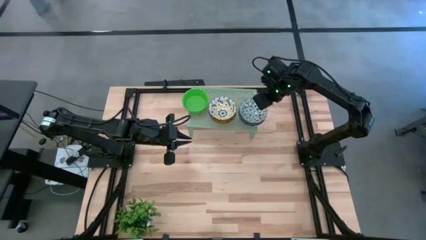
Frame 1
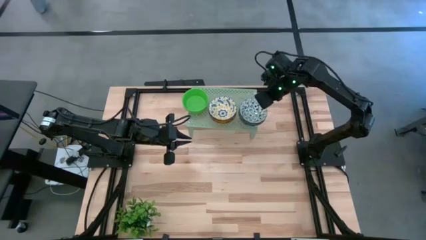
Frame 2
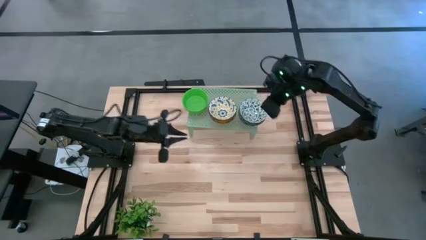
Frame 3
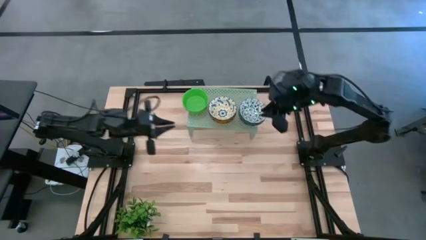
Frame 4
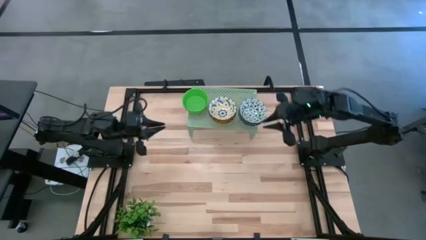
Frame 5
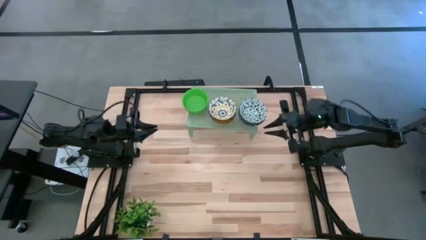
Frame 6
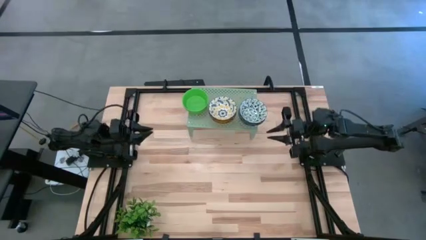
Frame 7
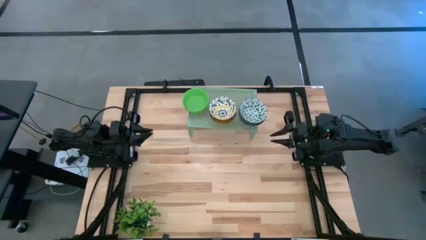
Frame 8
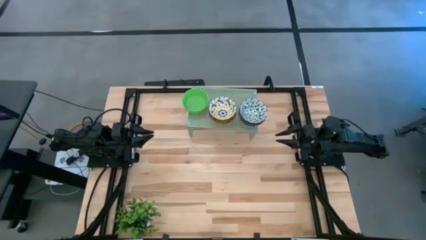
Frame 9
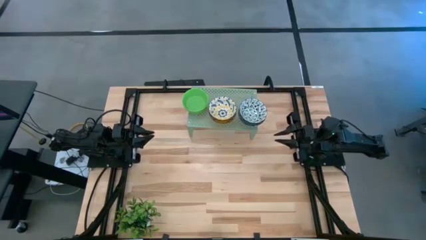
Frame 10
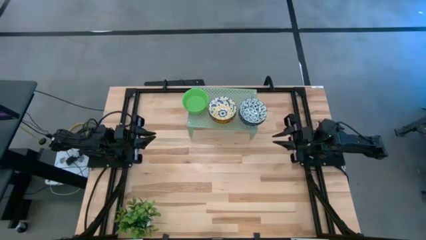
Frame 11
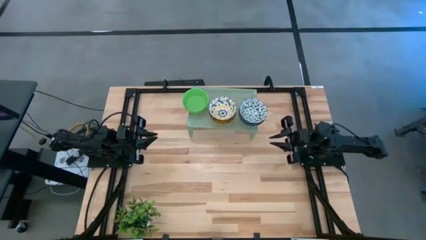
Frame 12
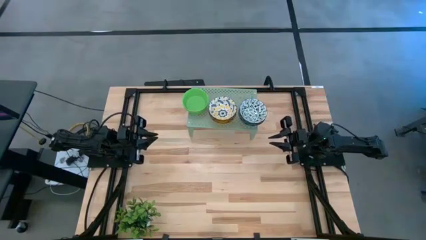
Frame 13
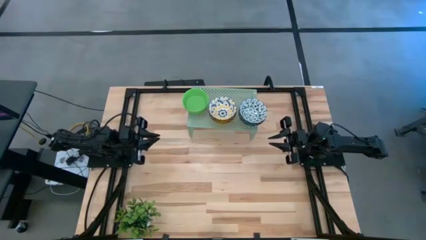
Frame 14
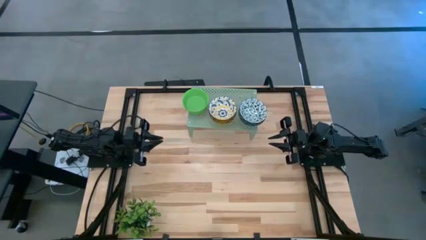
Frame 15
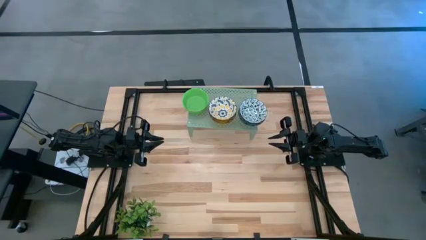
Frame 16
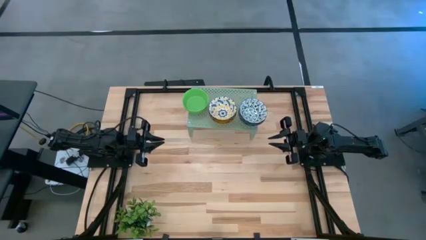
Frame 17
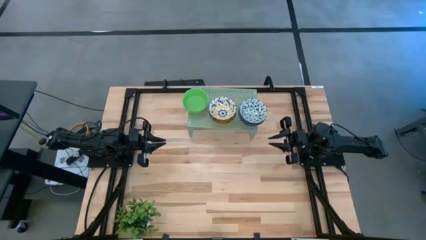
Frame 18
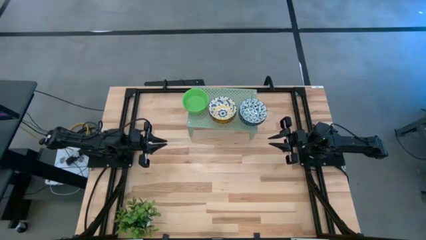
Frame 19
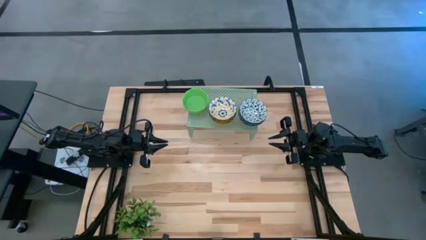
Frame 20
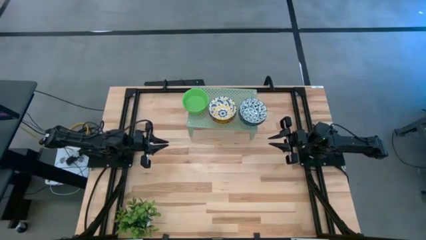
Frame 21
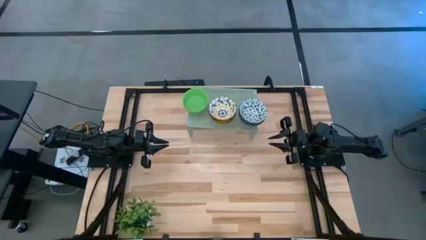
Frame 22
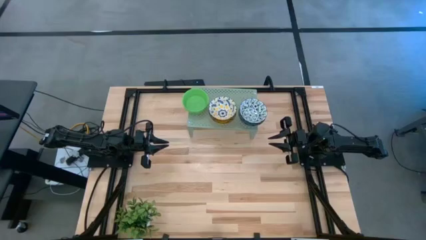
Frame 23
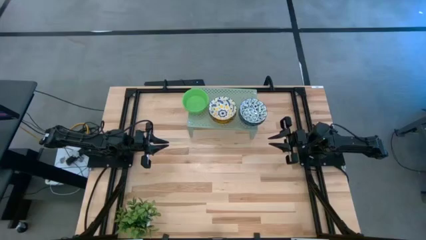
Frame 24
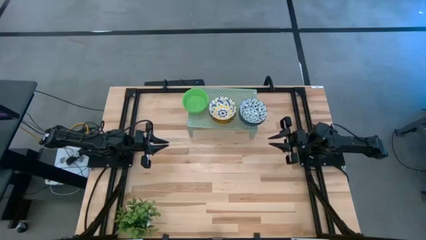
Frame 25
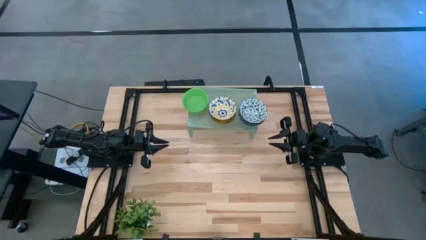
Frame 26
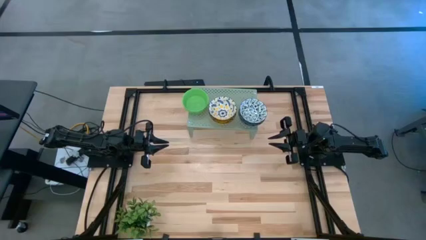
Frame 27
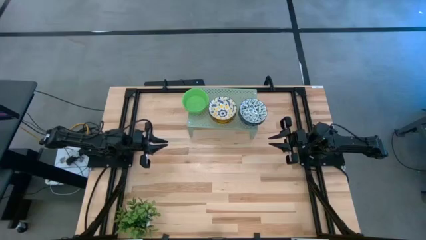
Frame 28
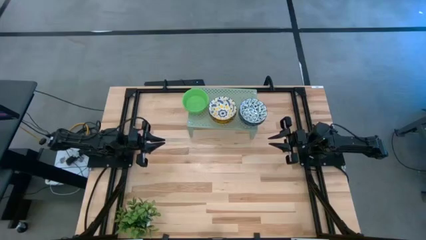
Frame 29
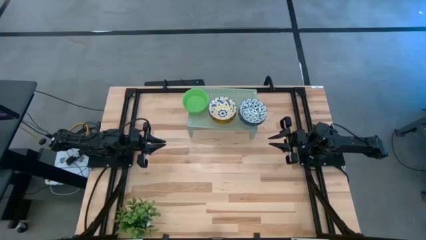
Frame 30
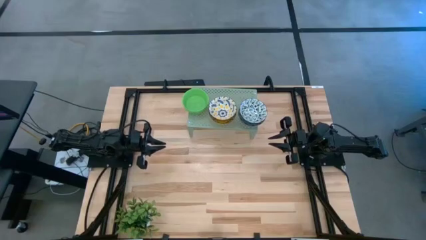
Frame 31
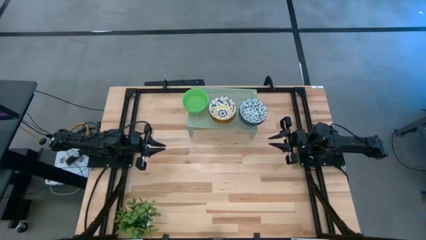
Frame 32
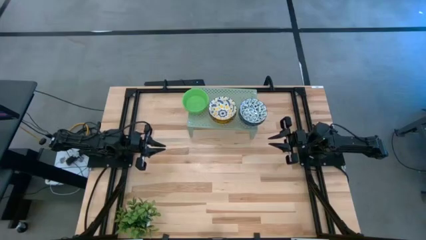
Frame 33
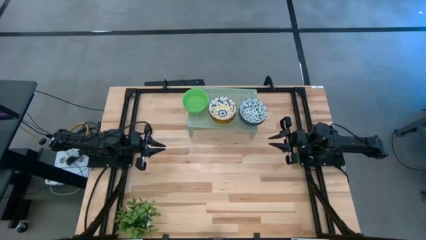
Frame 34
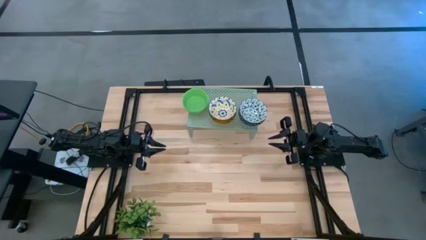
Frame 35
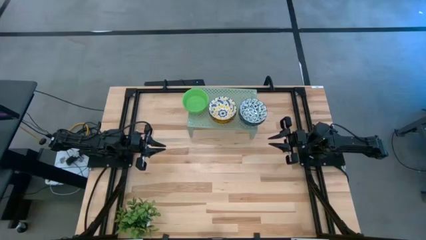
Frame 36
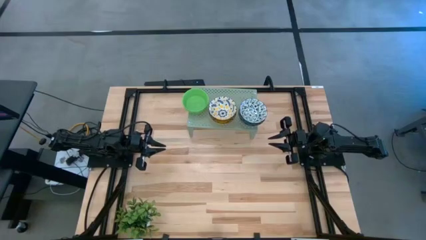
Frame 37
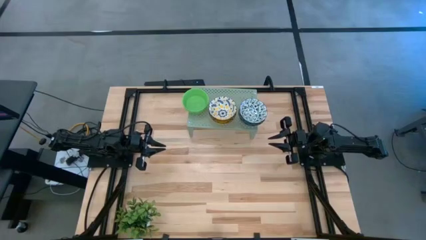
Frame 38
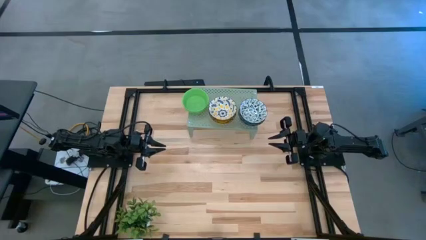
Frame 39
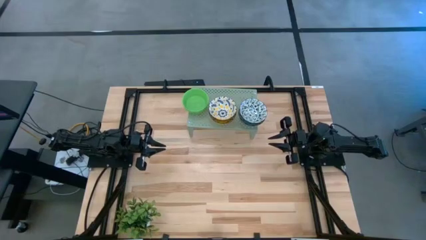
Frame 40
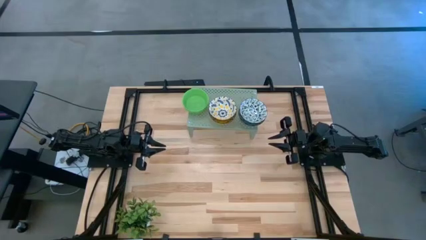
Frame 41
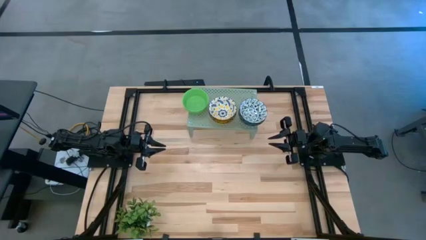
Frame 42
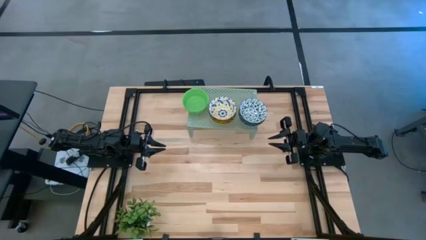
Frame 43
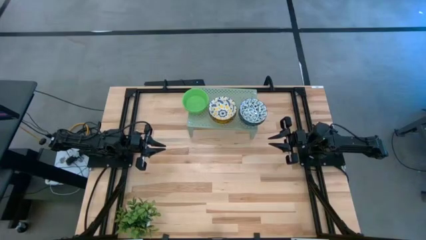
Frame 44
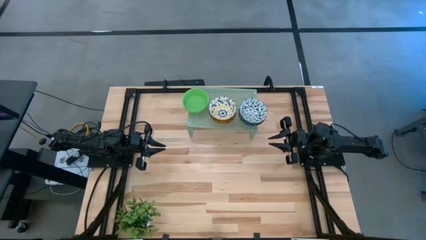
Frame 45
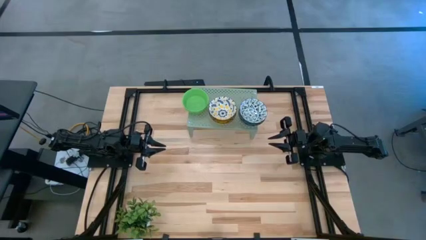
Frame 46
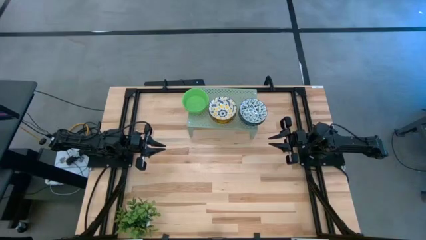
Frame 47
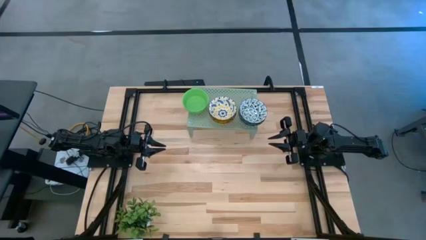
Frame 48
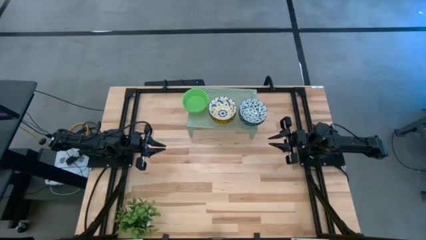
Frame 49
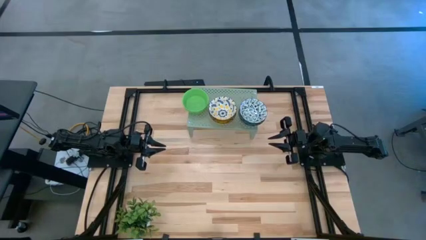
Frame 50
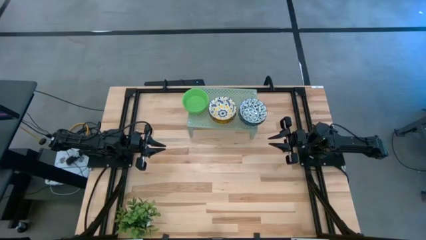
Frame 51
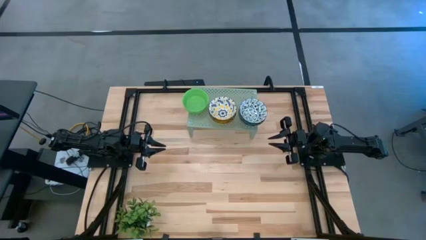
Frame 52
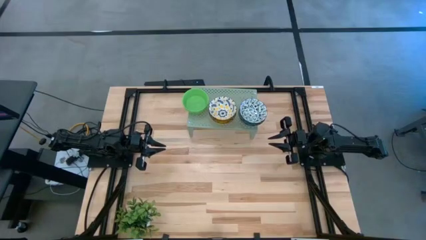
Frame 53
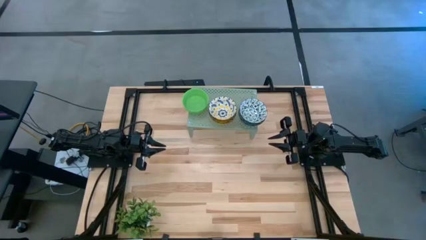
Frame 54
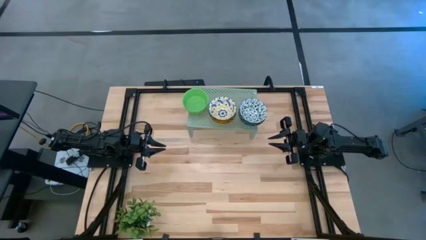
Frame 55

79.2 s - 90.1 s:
Task: Pick & Place Mini bowls
Return to Home Position

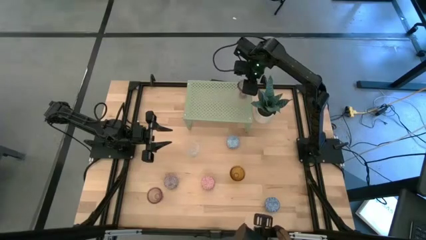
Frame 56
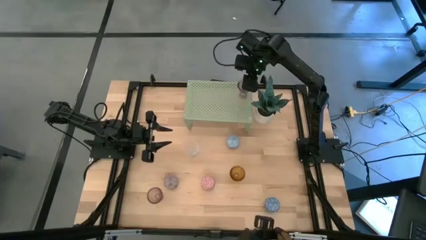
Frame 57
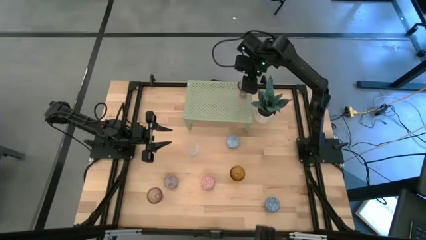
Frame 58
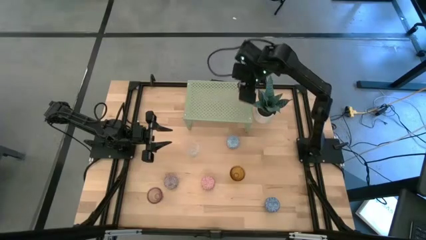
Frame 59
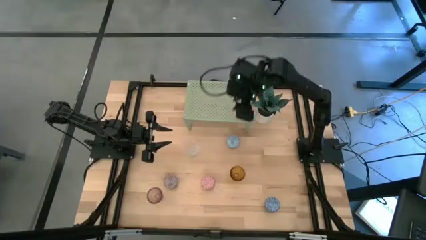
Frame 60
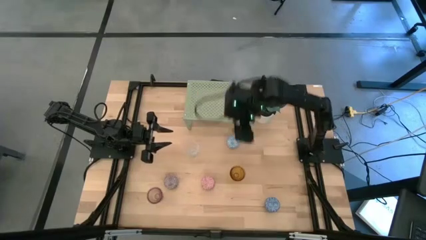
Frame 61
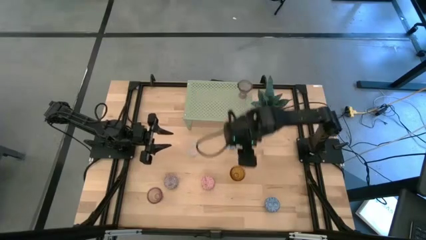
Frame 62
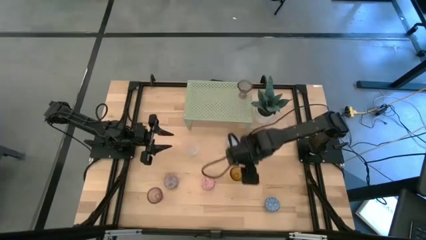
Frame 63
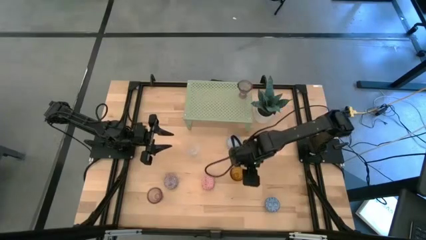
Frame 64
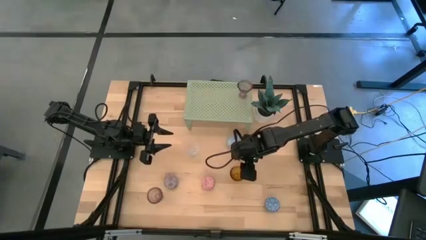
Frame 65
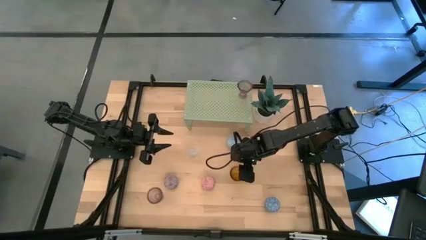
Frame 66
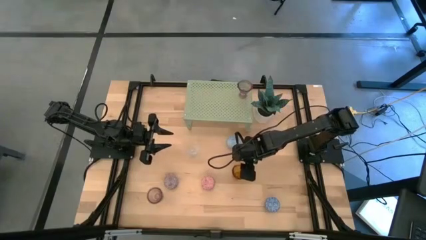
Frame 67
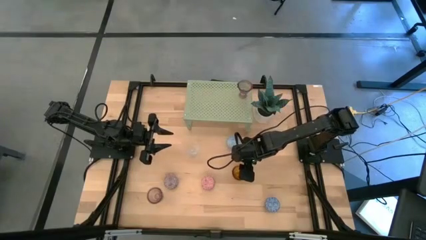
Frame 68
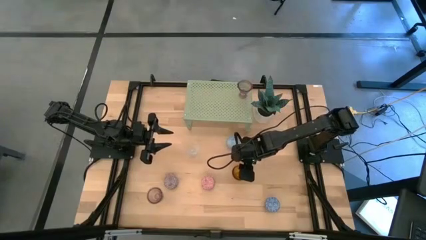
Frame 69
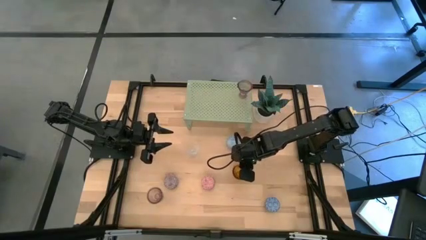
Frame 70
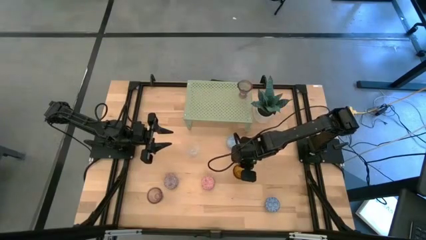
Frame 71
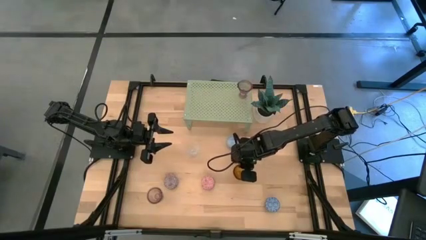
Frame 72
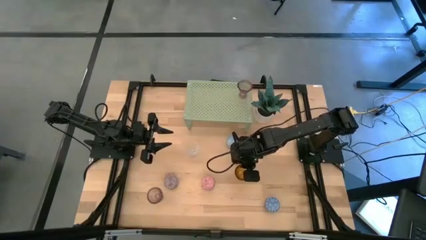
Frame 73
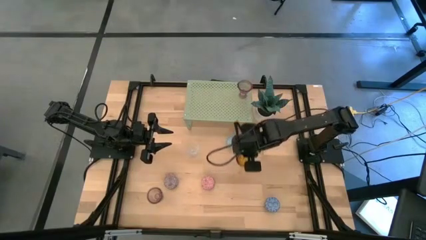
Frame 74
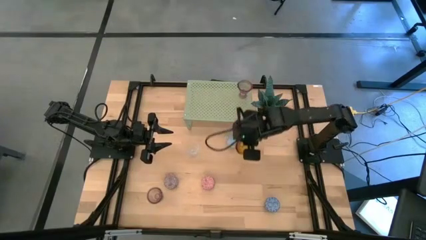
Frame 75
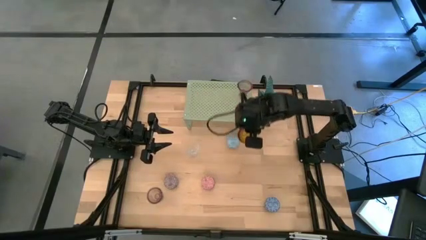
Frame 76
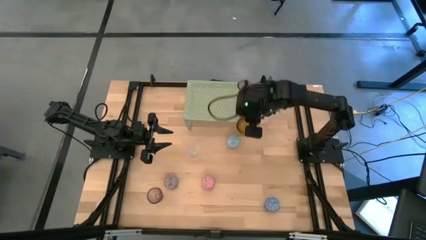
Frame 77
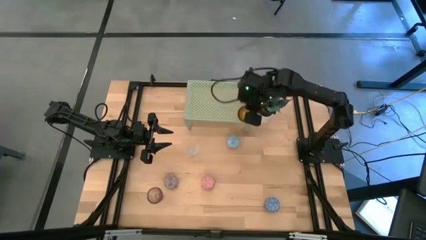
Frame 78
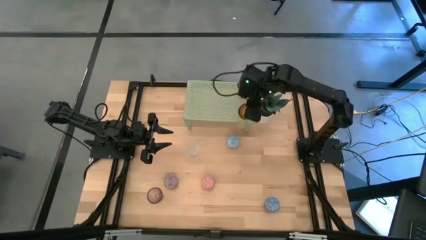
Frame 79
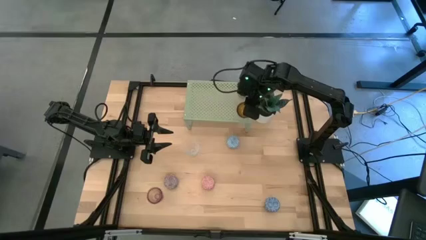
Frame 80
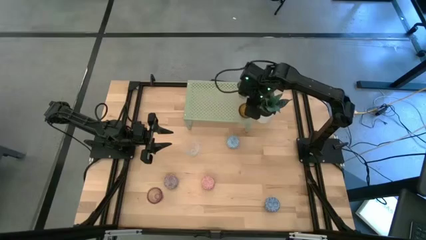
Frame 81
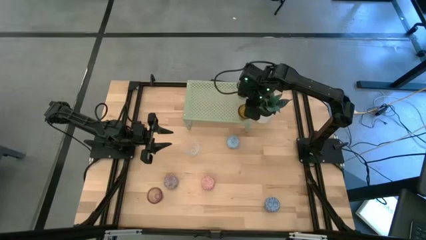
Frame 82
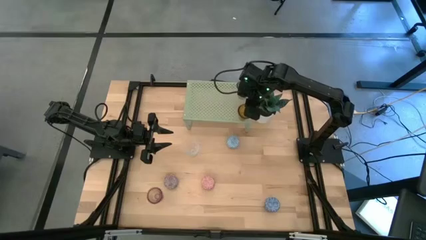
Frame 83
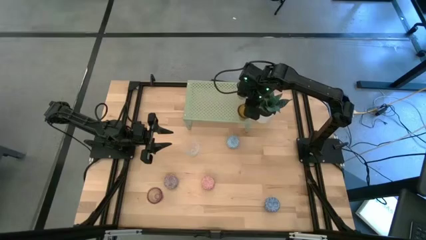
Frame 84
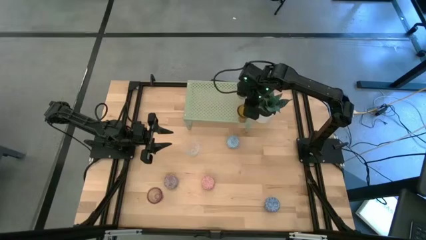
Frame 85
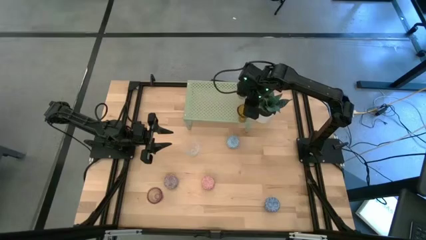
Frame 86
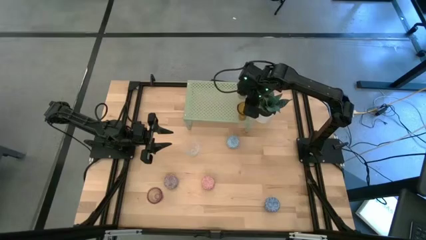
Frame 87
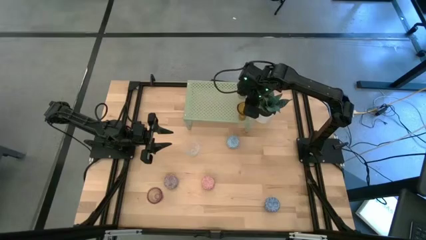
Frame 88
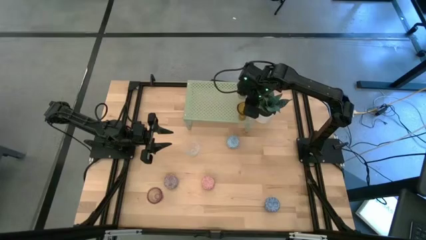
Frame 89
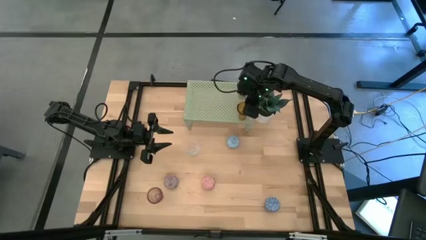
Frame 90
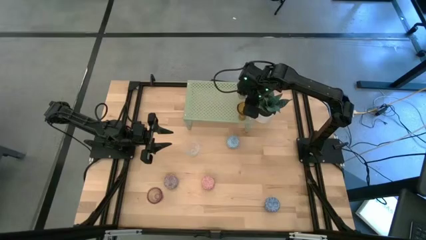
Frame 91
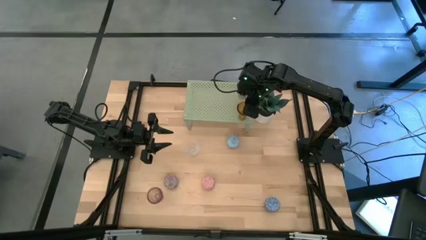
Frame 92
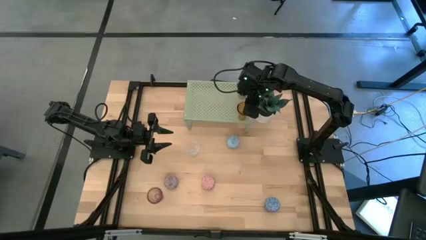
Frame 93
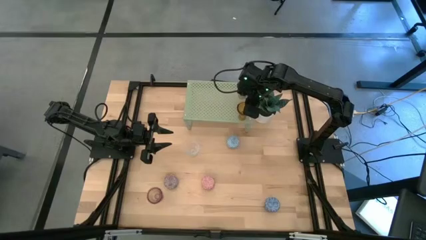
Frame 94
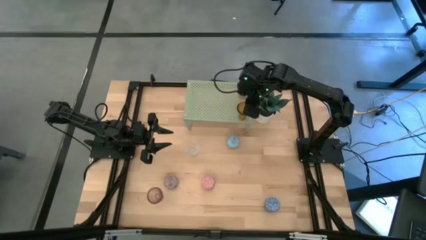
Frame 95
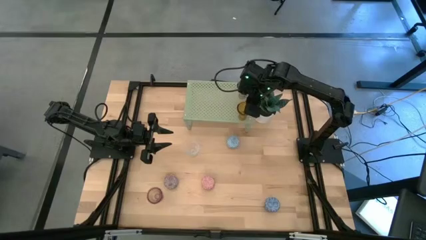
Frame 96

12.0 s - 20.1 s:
Task: Pick & Place candle stick holders
Align the orange glass candle holder with the purple glass candle holder on the shelf
